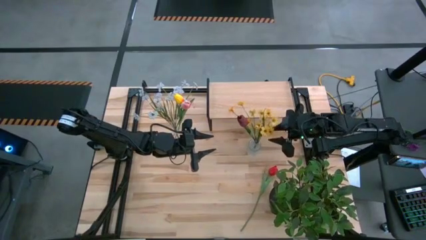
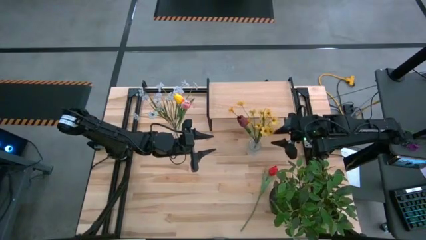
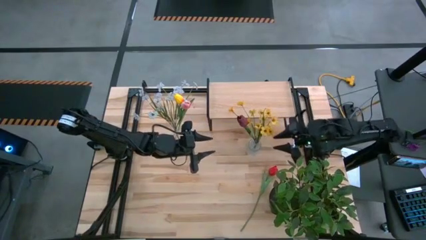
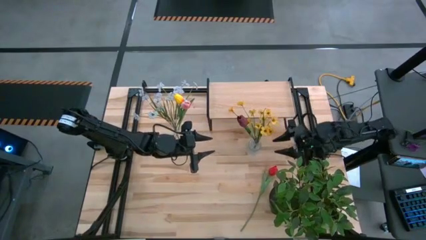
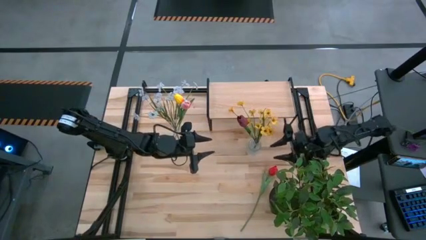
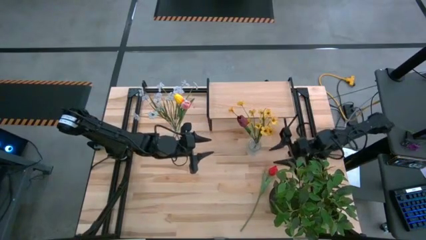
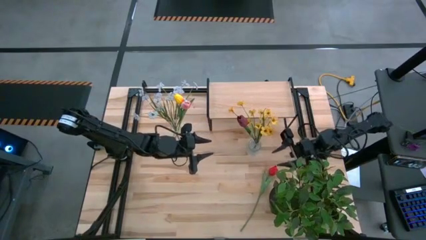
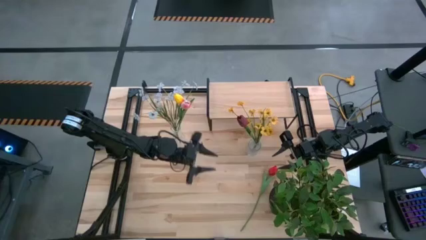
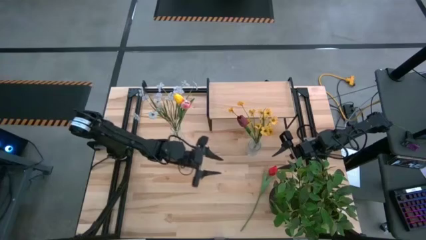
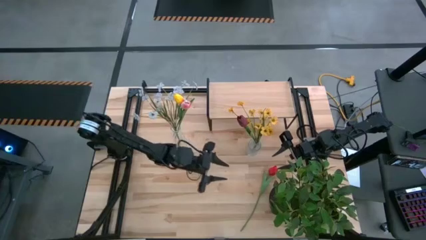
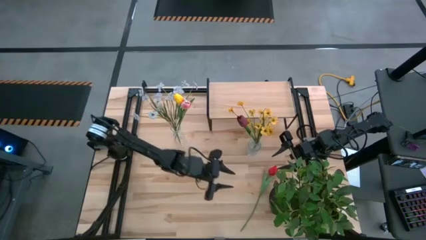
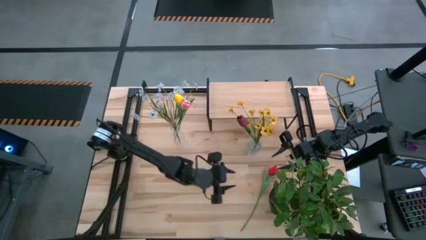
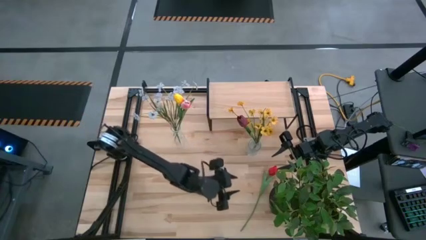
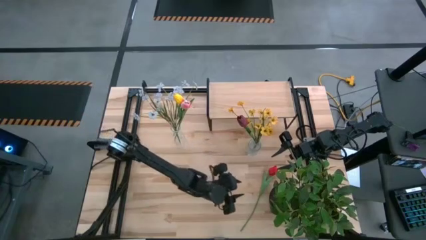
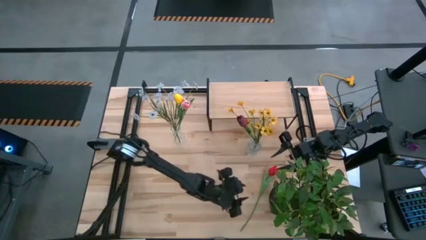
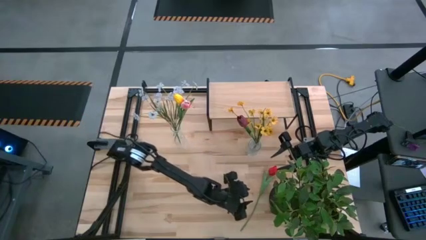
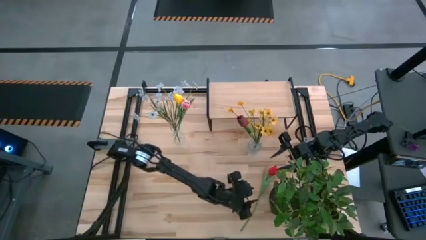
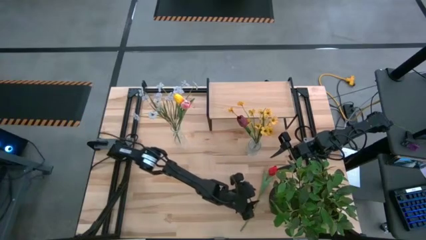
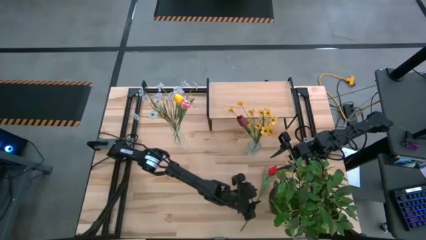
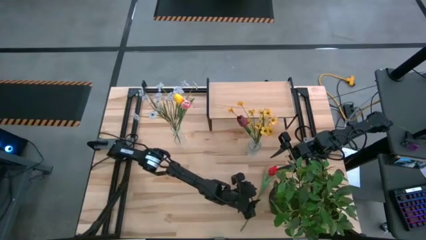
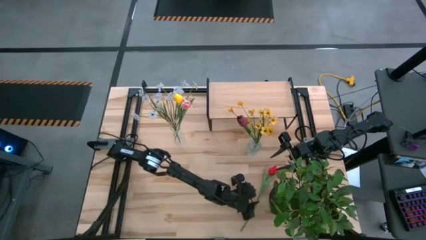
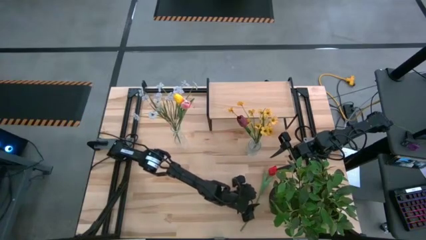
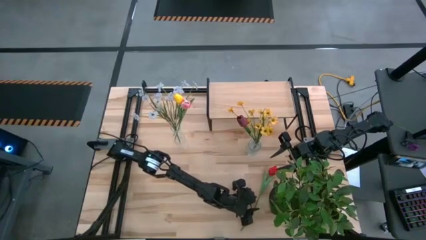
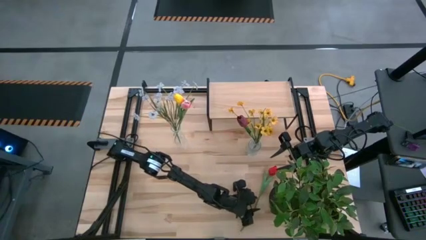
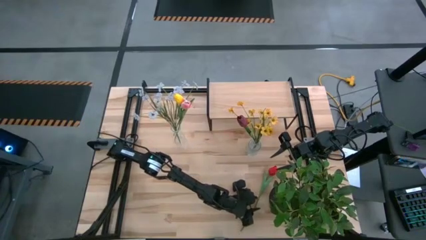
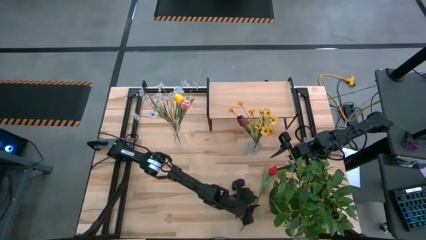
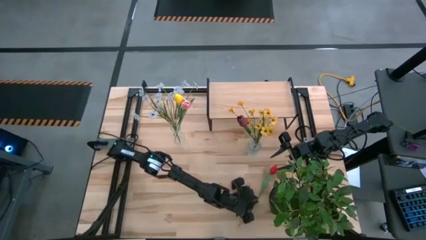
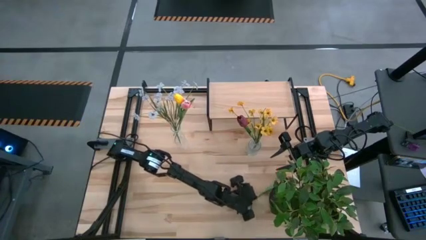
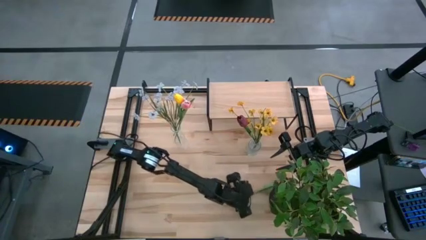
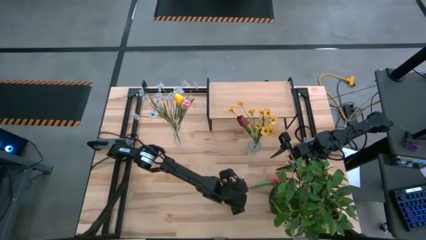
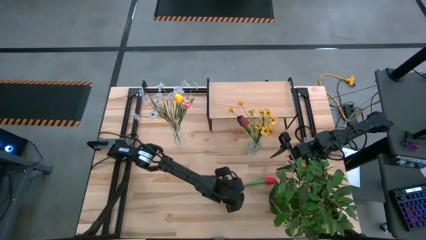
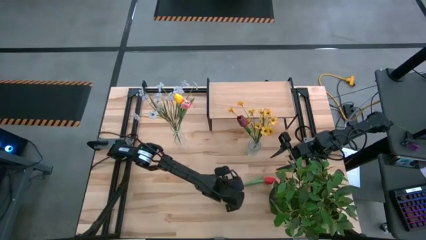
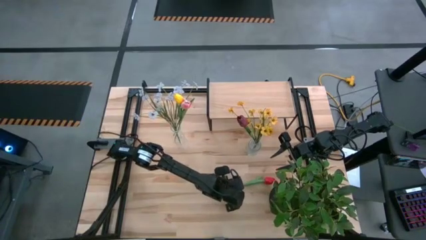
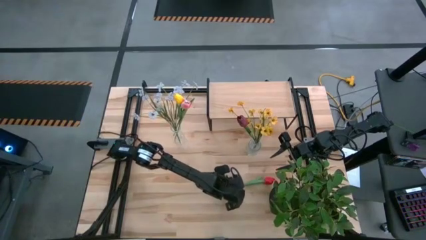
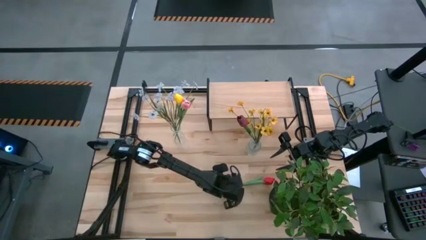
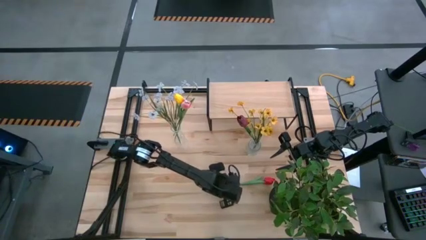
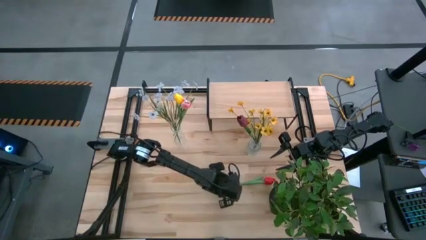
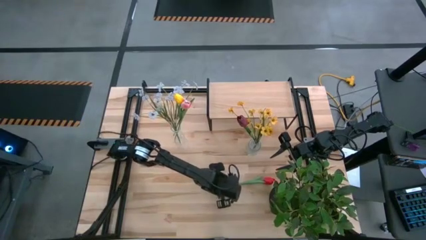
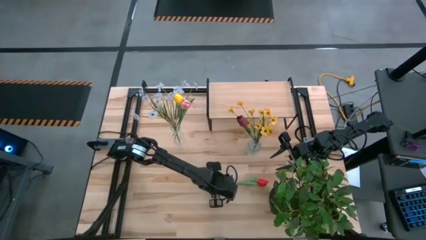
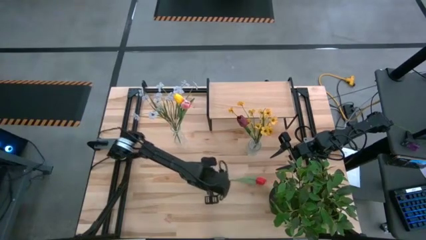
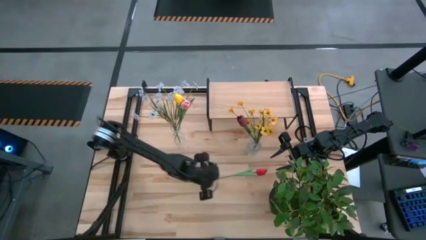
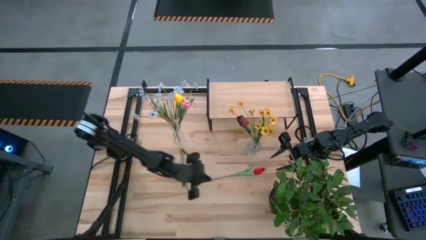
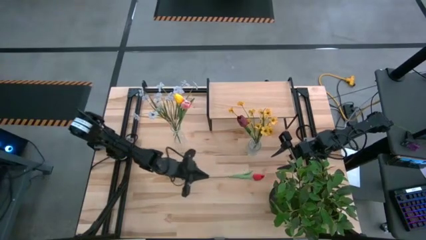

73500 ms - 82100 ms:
Task: Pick and place flowers into a vace then onto a shelf
Put the red flower into the right transparent vase

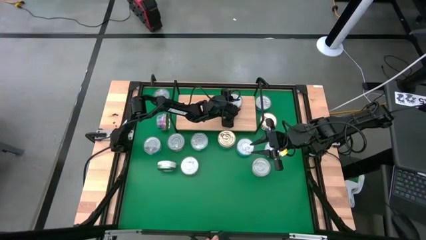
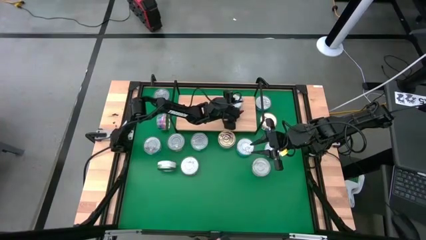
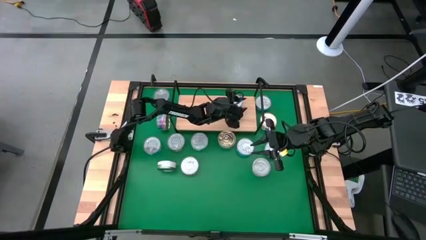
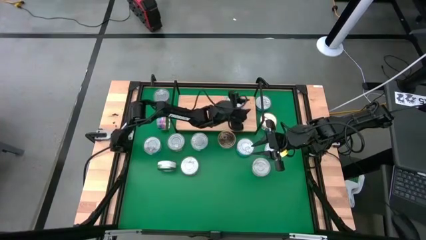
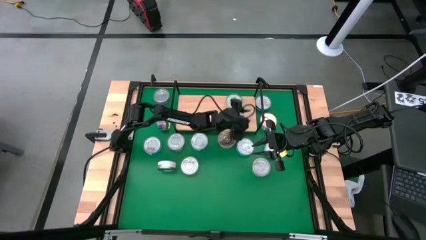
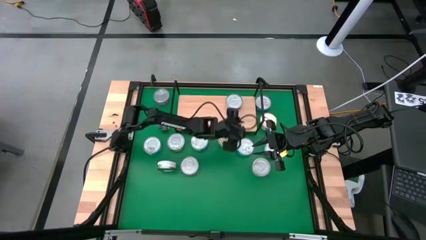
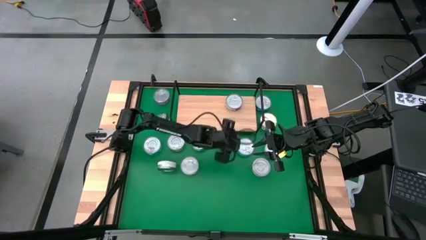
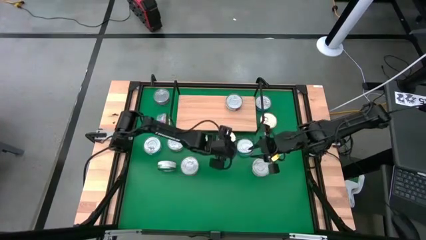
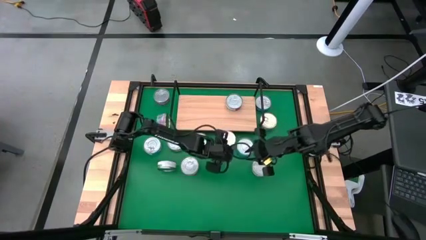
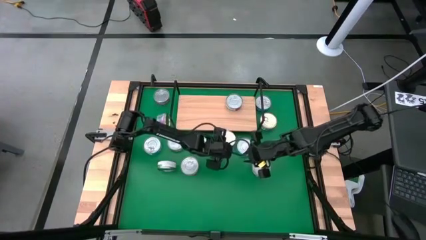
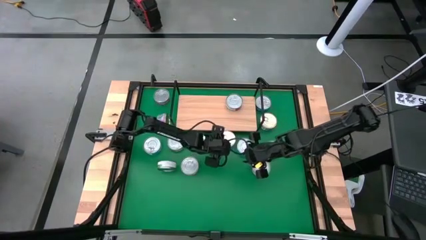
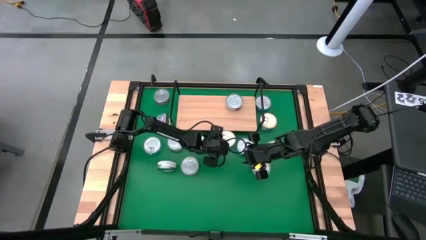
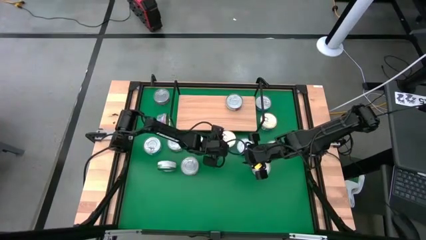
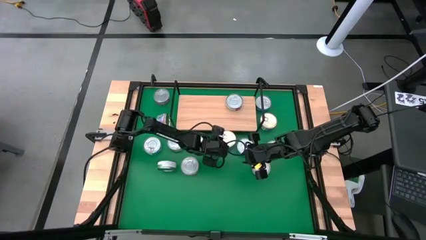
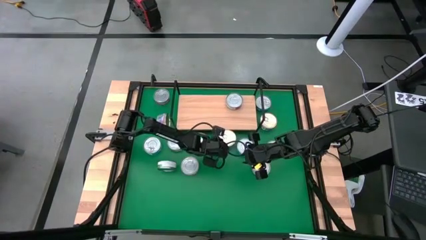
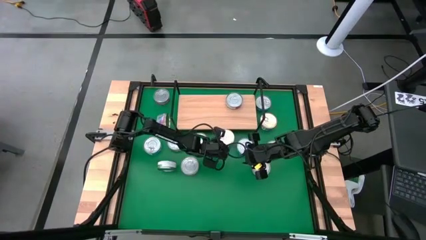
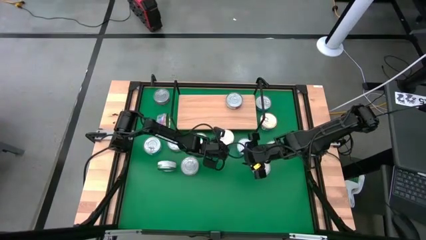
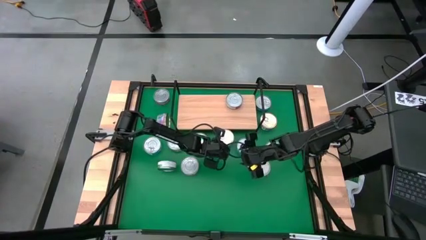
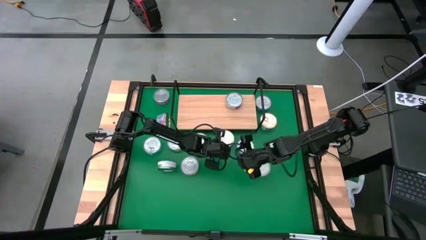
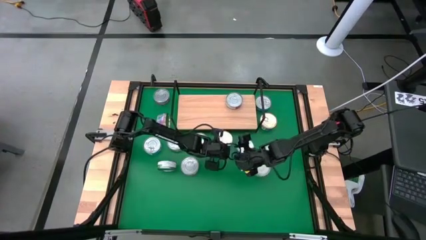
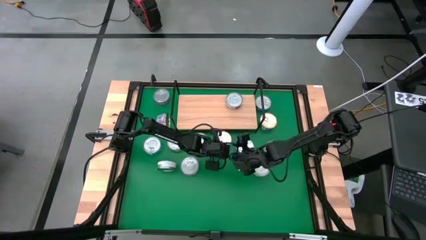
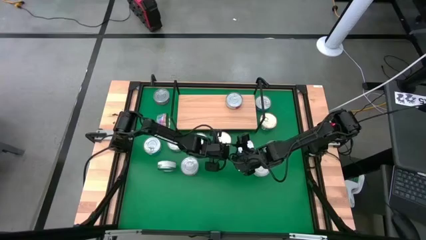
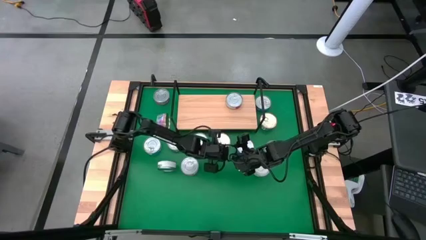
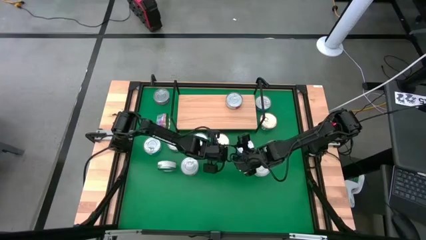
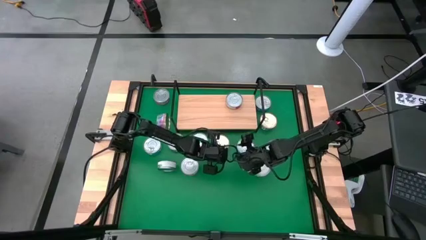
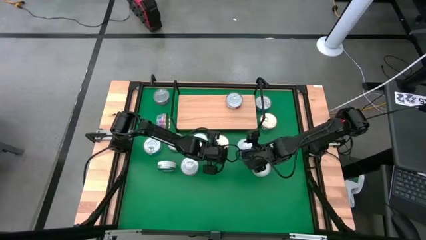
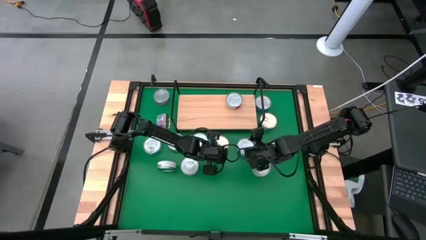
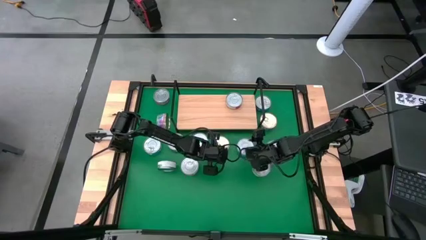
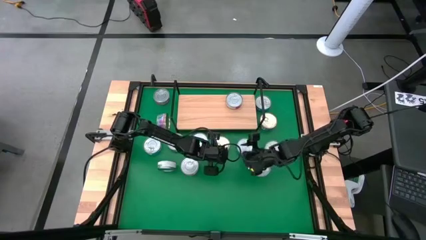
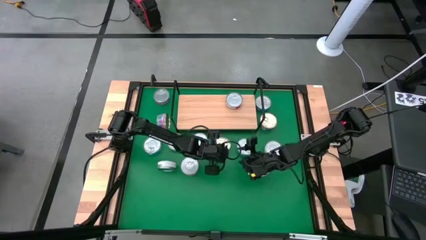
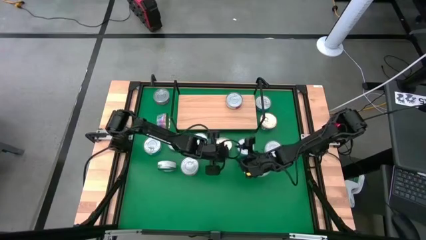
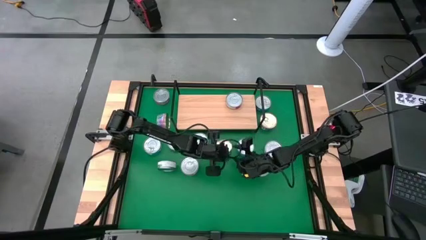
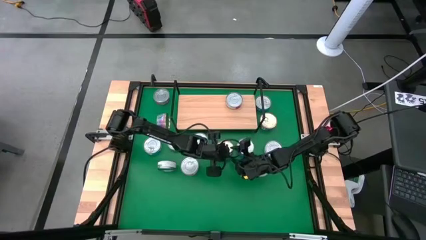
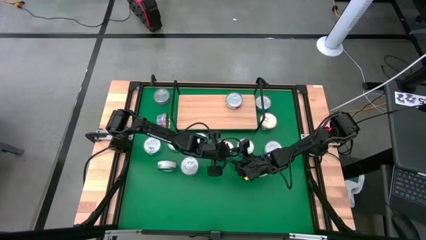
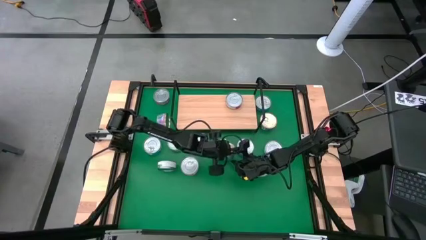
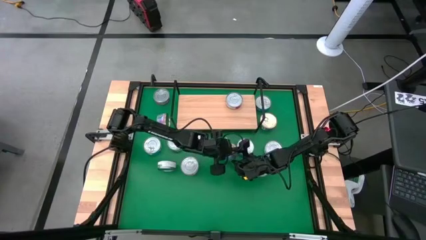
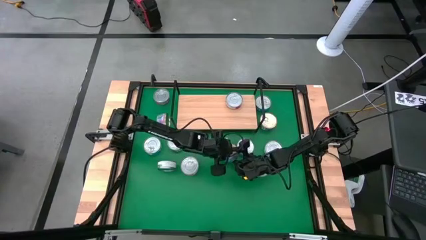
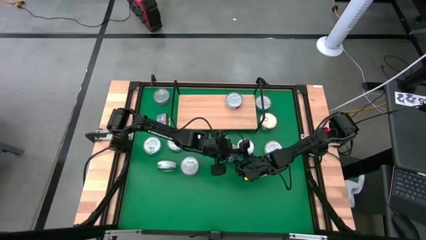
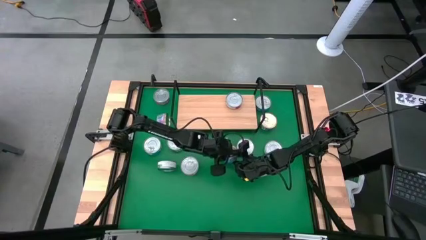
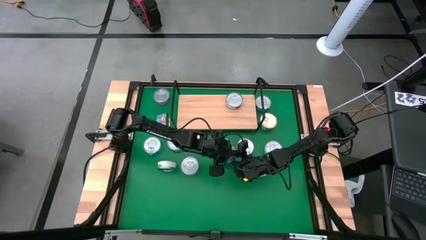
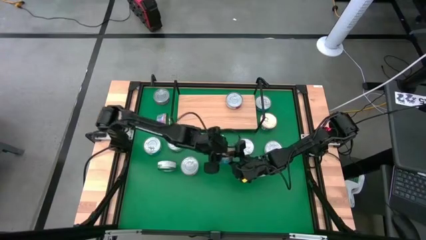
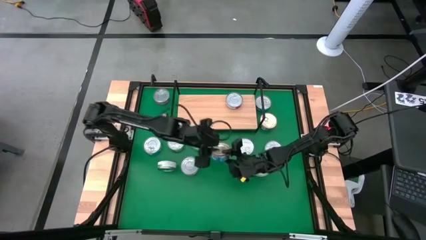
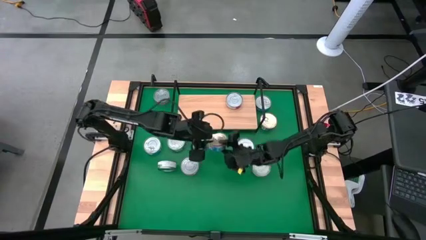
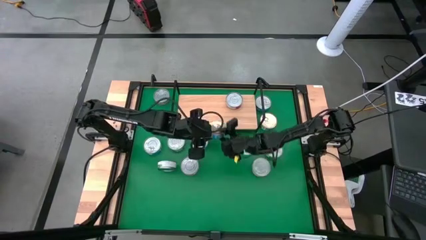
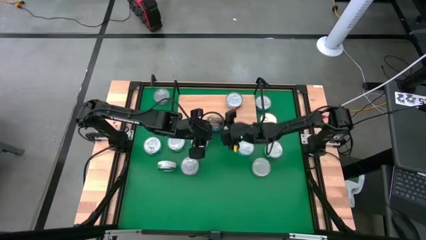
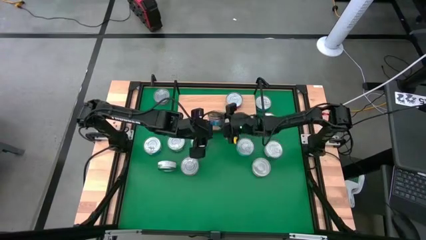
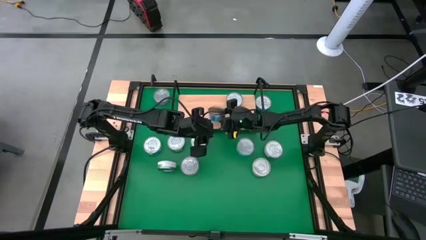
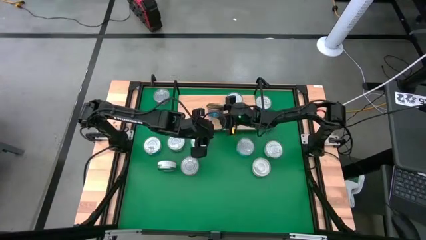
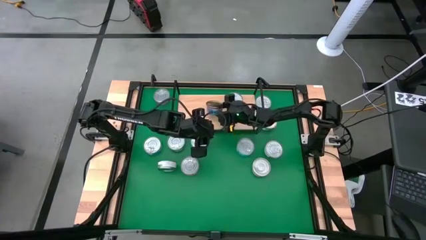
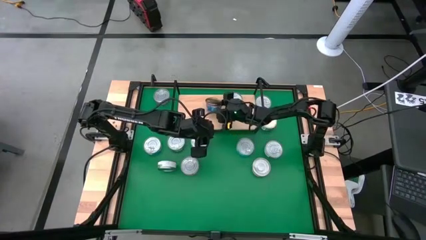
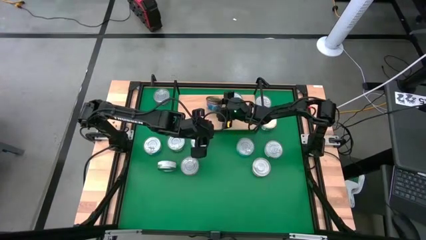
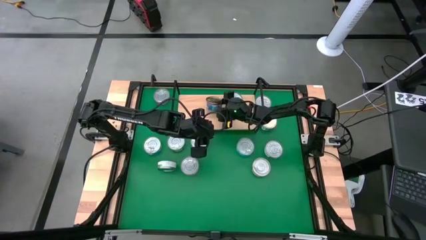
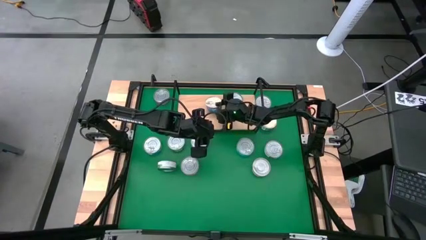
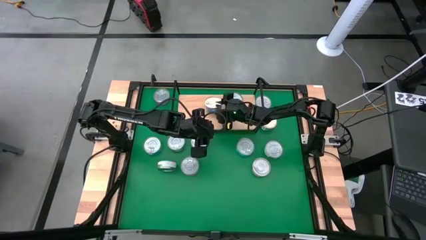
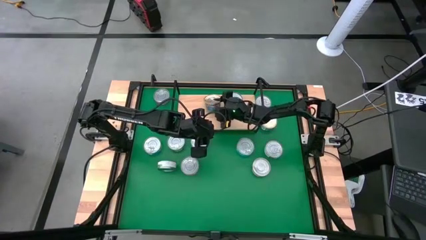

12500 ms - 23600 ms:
Task: Stack canned seafood by type on shelf
Put the blue pink tuna can on the shelf
